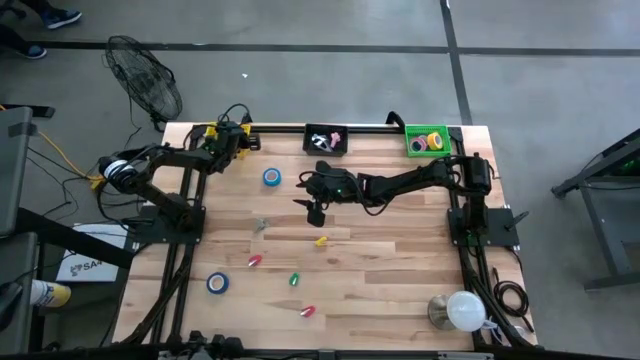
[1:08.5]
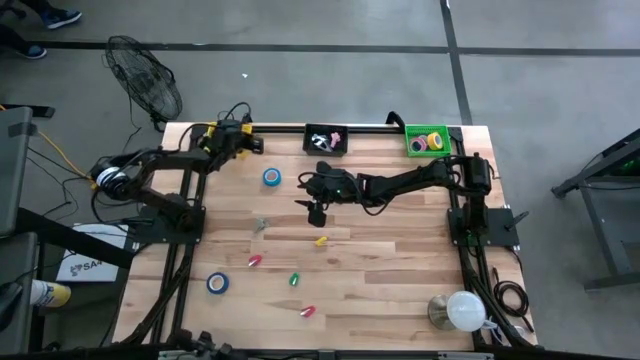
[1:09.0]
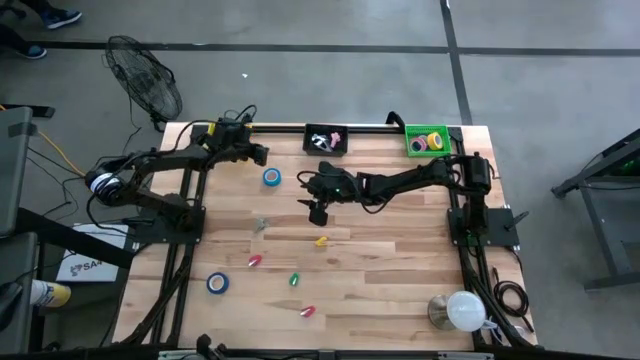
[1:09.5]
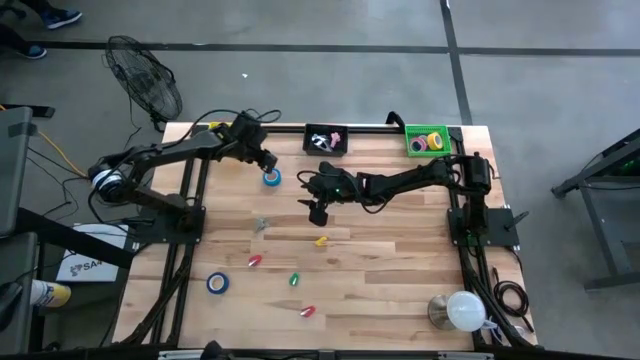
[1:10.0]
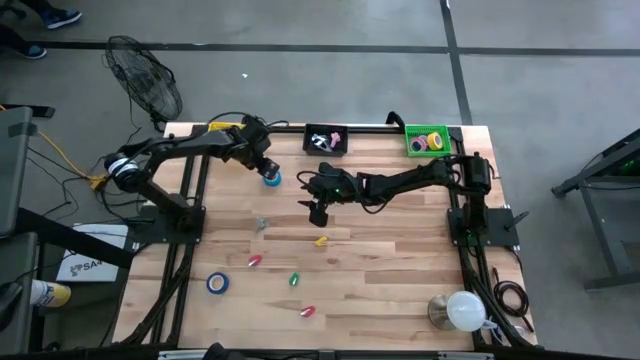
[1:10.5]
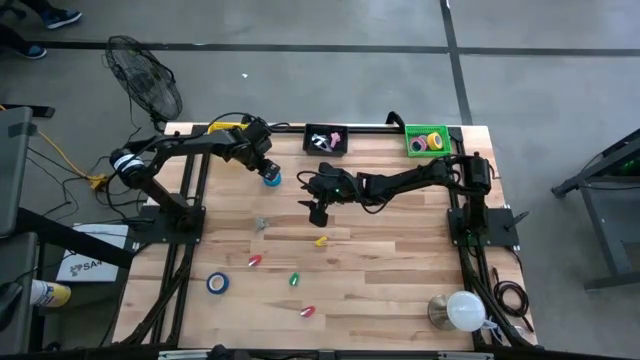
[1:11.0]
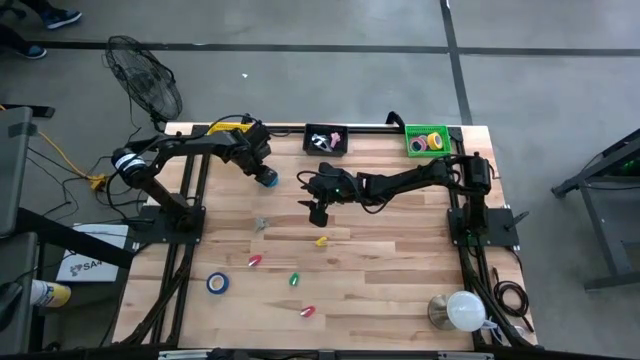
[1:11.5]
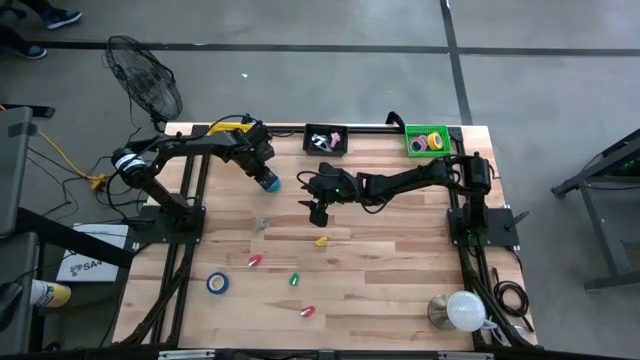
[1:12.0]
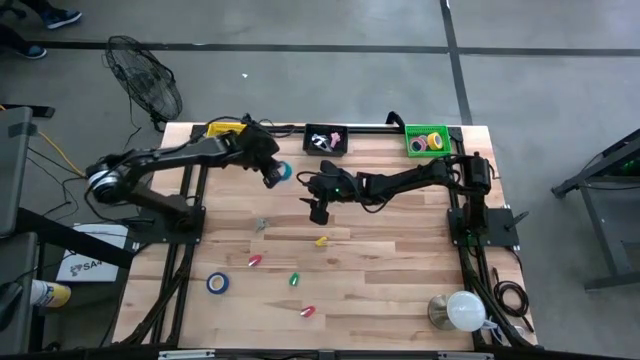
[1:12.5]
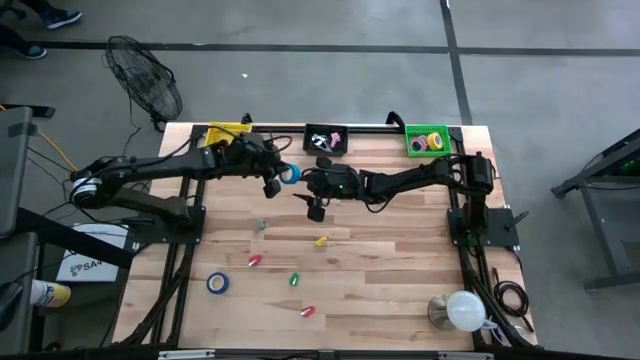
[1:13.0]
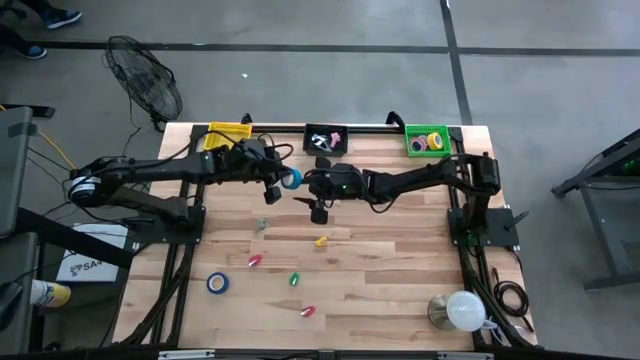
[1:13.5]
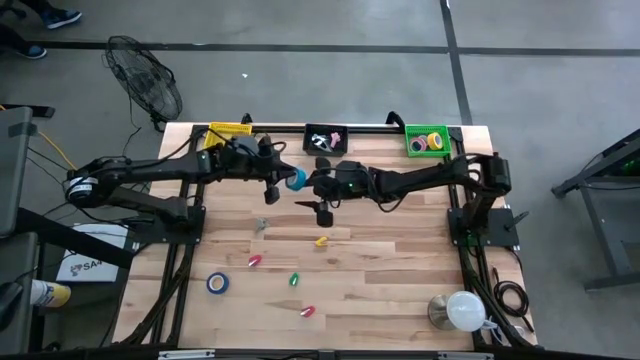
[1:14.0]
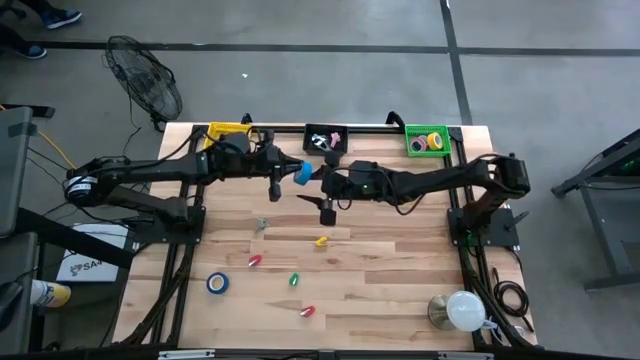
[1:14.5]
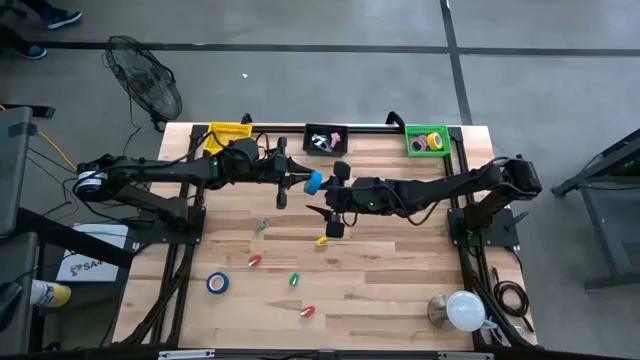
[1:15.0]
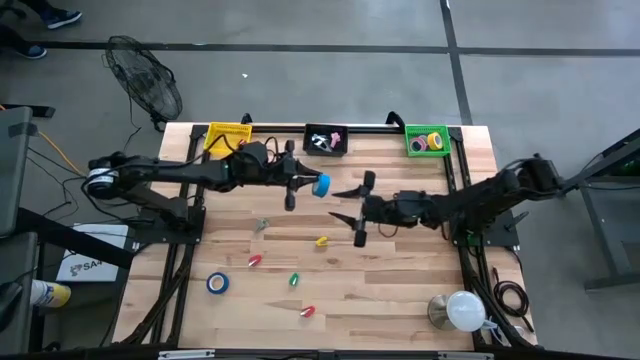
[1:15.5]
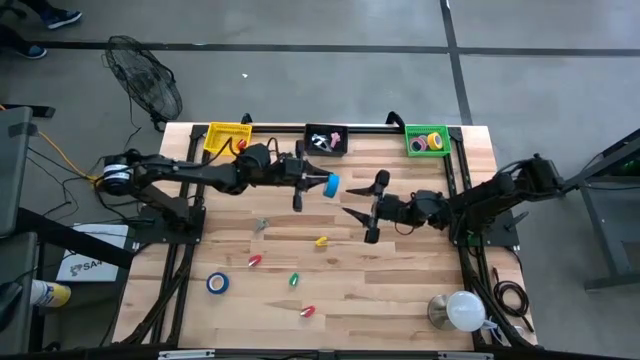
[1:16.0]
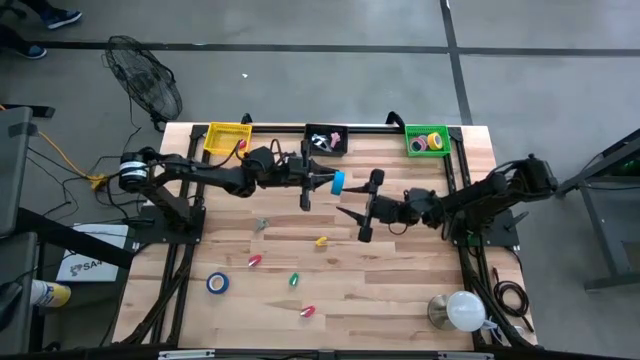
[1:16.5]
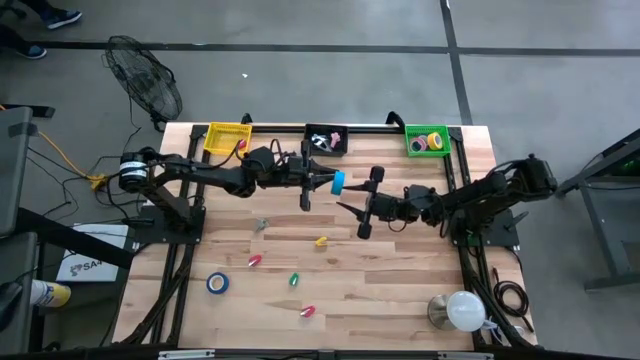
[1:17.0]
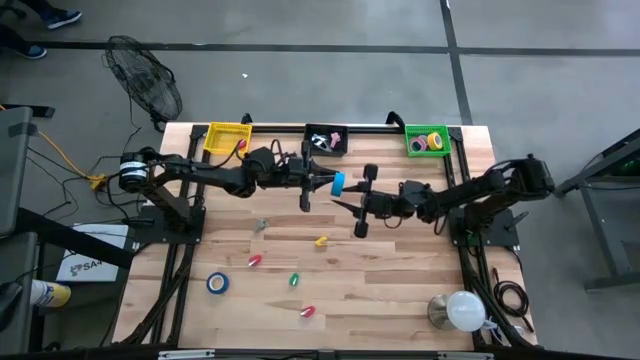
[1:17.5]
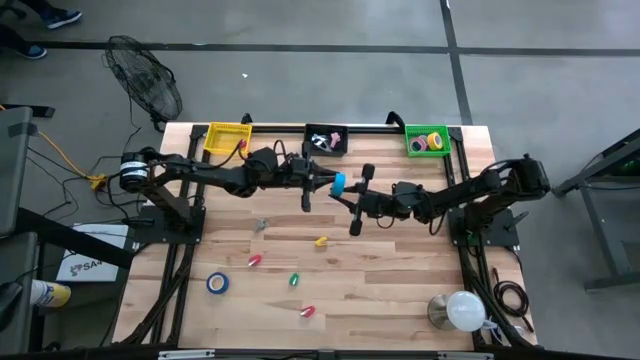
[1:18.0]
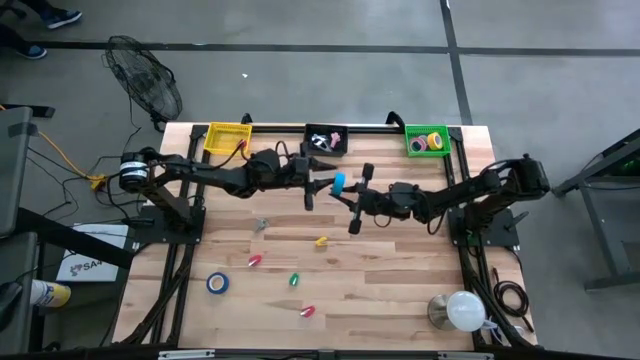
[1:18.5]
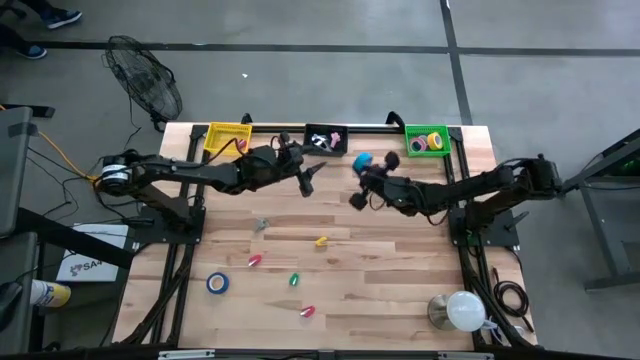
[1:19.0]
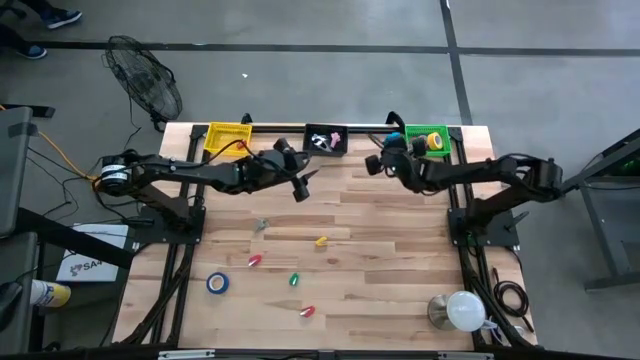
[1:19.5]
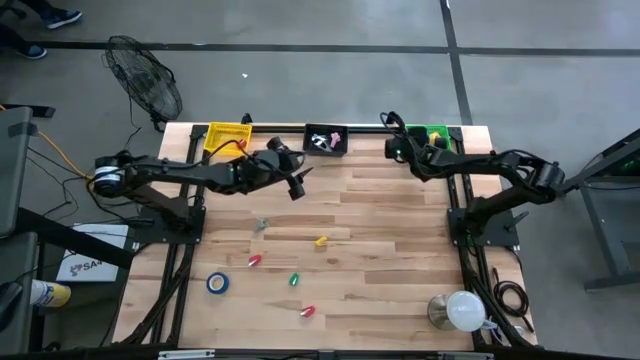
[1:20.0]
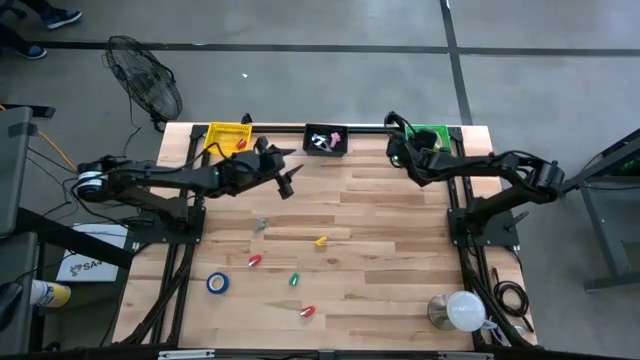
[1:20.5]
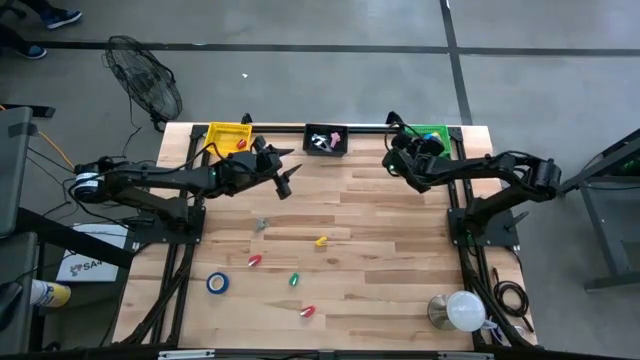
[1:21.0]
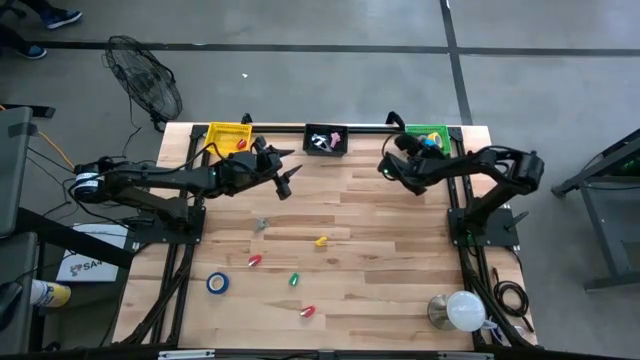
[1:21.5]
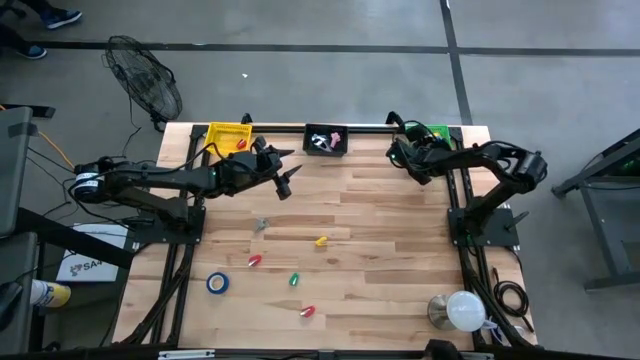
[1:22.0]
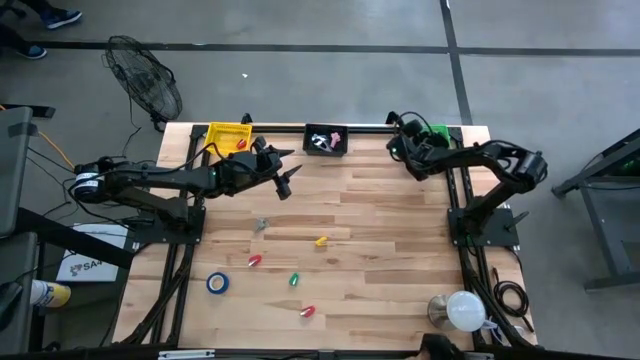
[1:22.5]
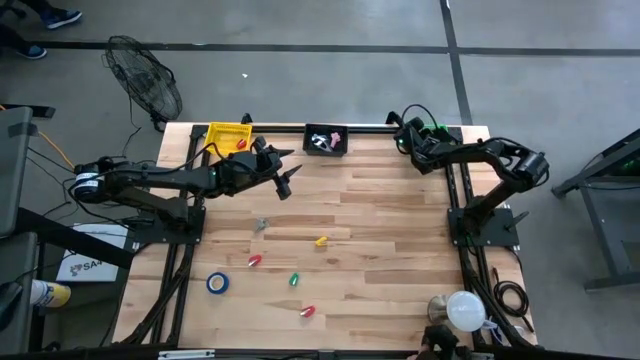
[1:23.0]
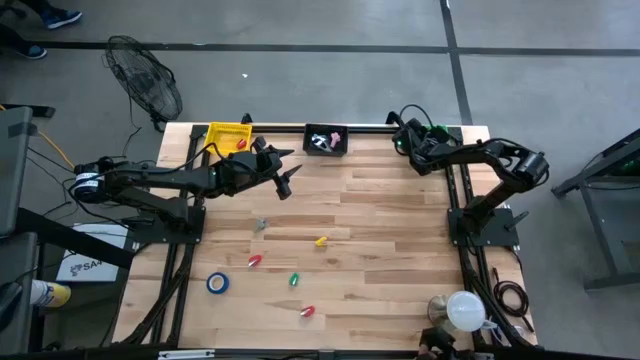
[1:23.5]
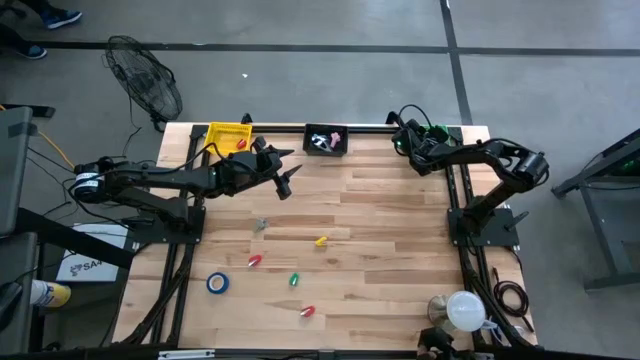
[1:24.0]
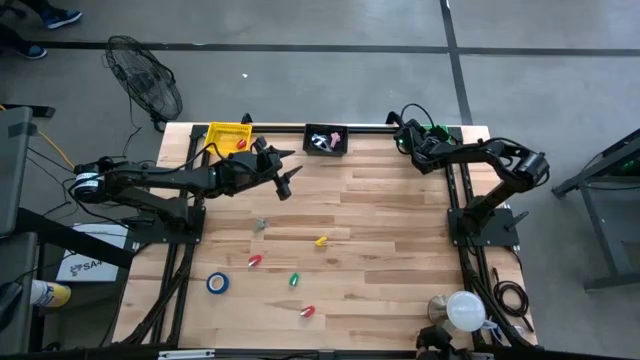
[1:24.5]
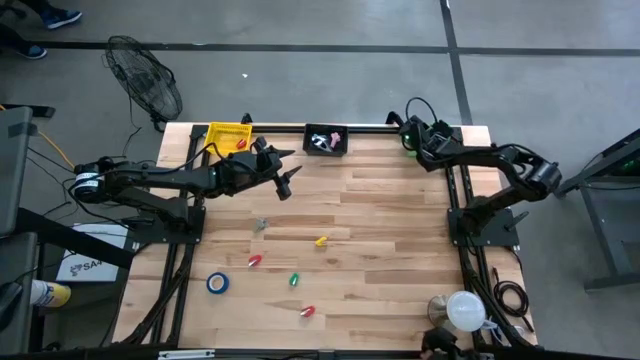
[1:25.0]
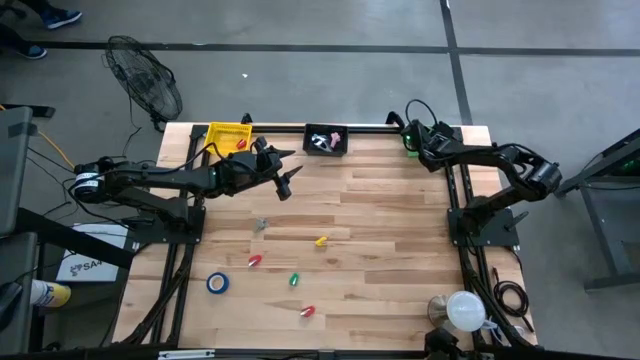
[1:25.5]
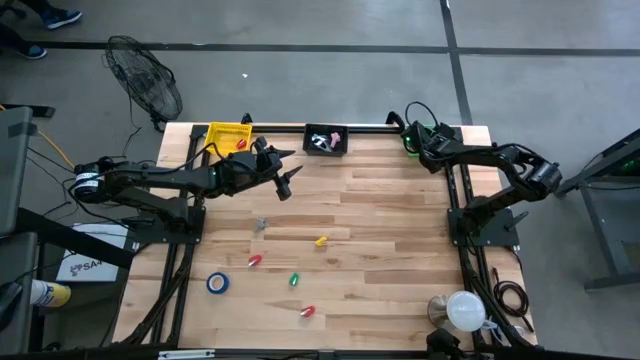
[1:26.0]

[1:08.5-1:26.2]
Task: Pick and place Stapler, Stapler remover, tape
Put the blue tape into the green bin

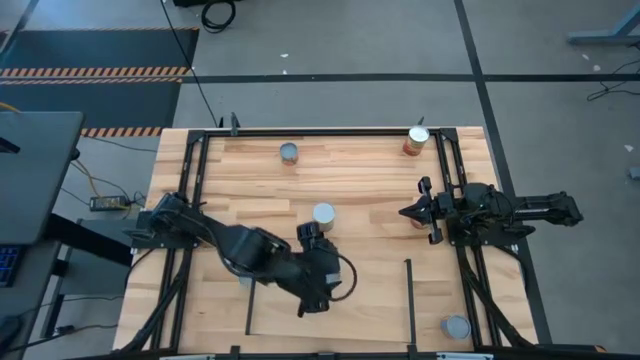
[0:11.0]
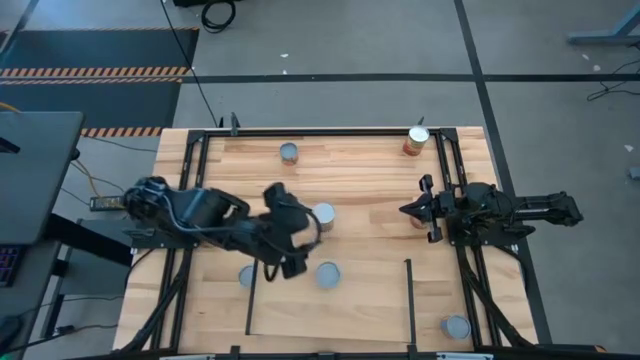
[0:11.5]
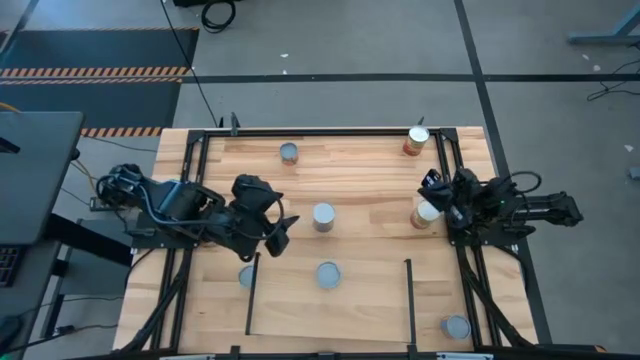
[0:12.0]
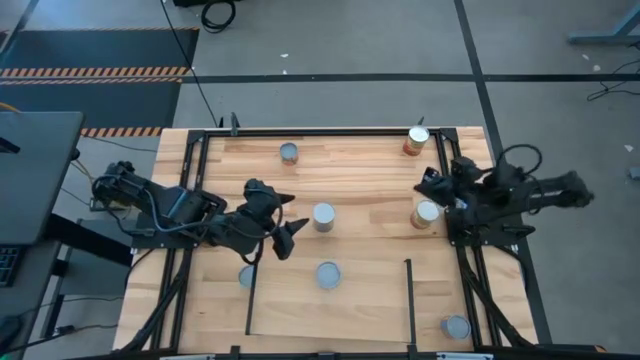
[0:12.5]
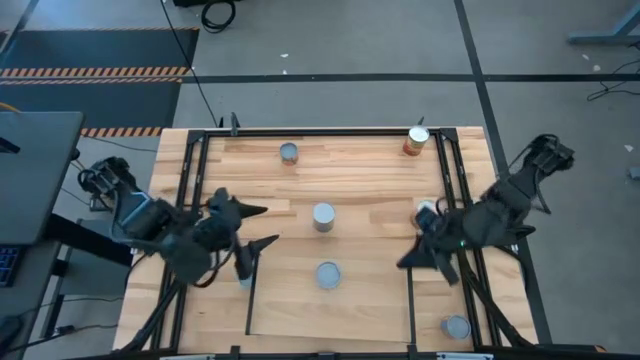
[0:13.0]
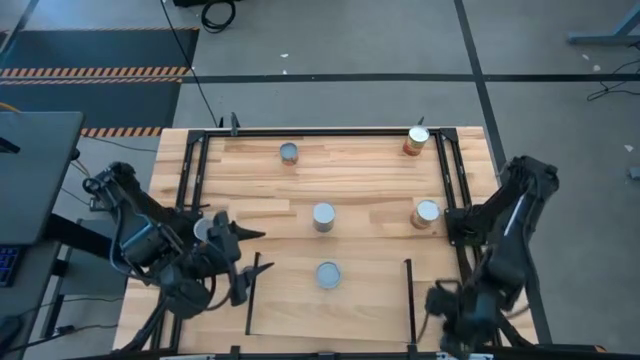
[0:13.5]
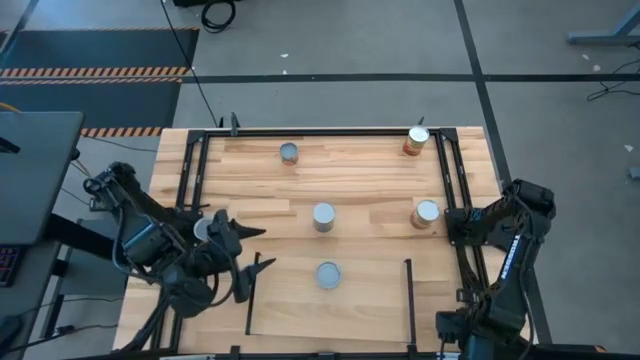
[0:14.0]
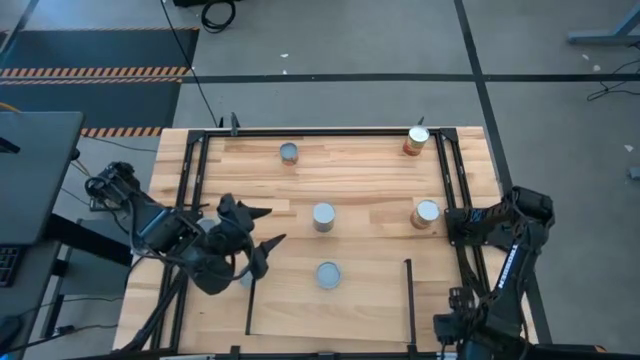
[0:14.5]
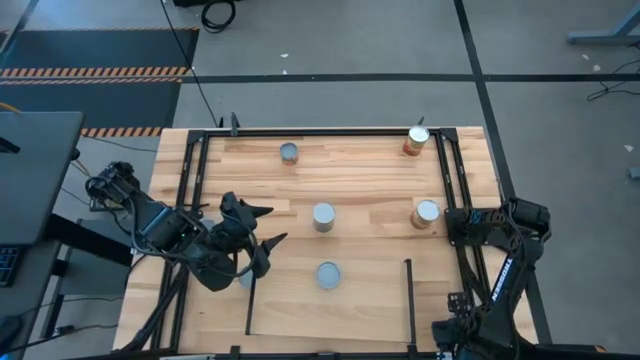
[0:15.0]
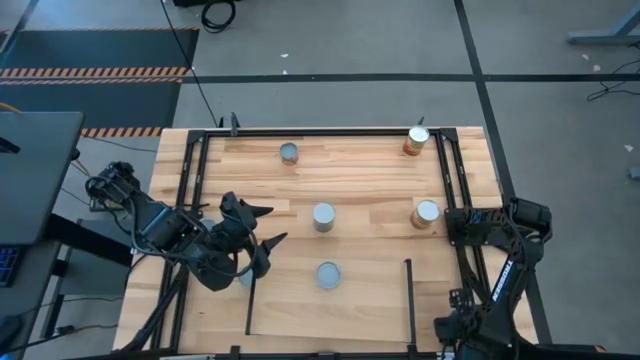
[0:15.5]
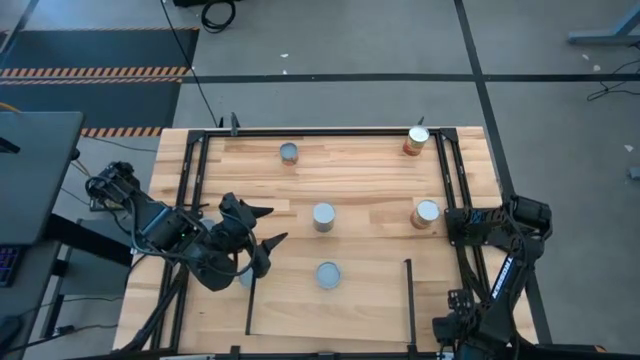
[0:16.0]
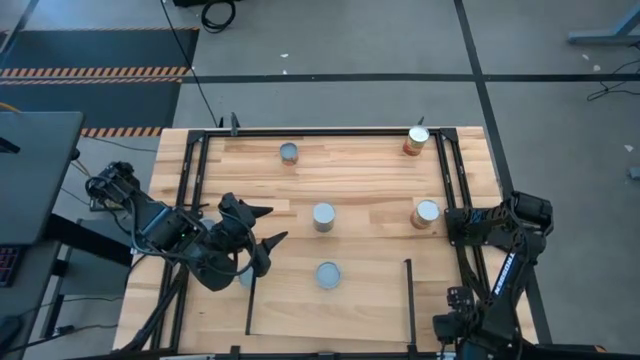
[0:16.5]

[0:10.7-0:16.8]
Task: Pick and place cans onto a shelf
Put the blue canned corn on the shelf
